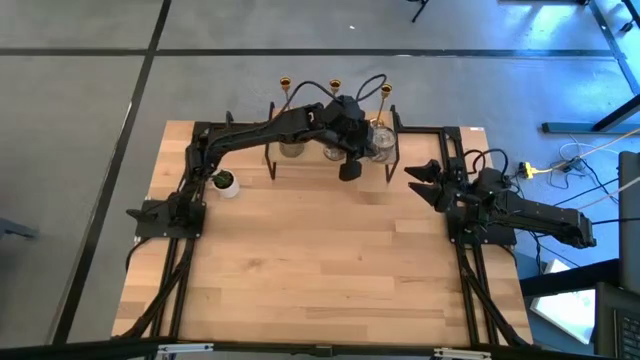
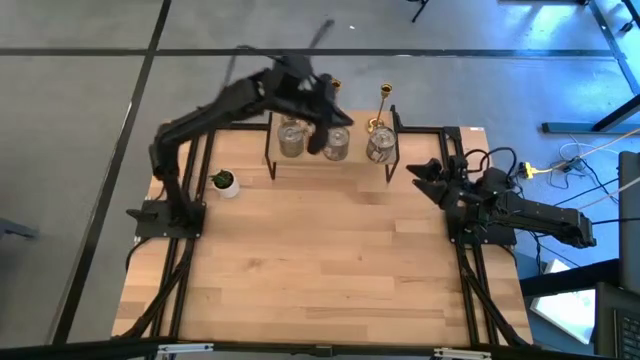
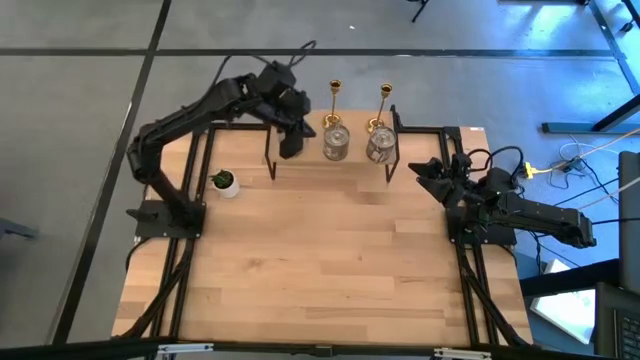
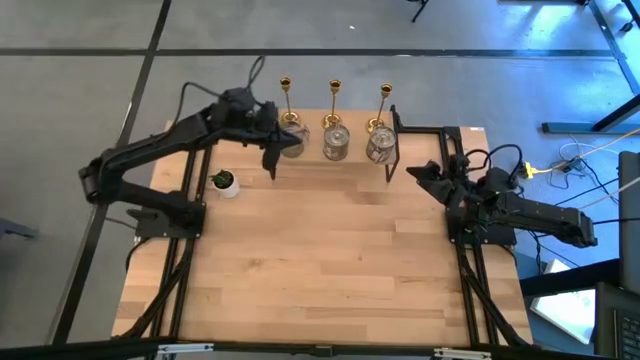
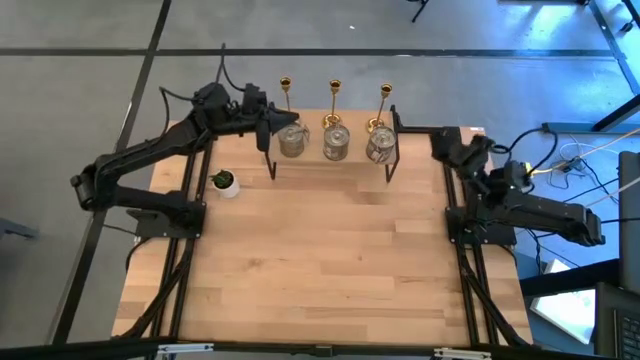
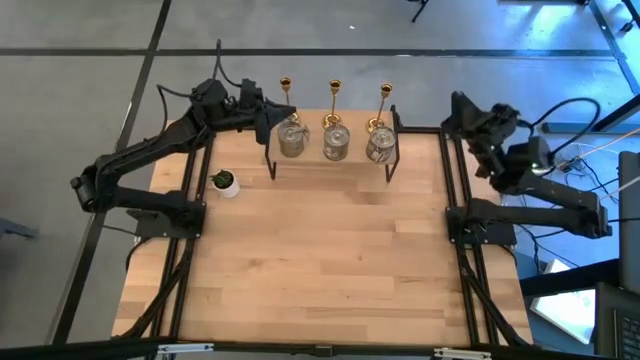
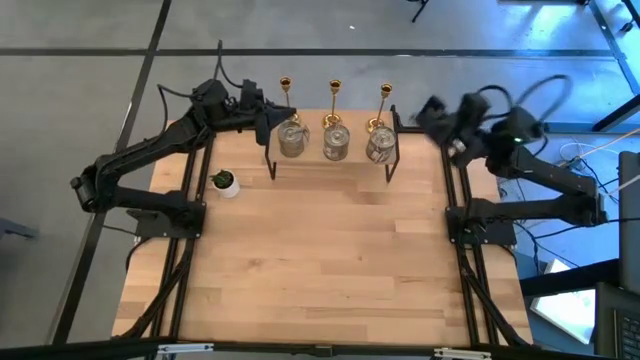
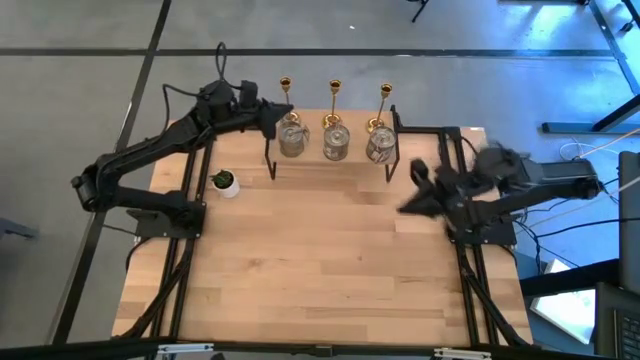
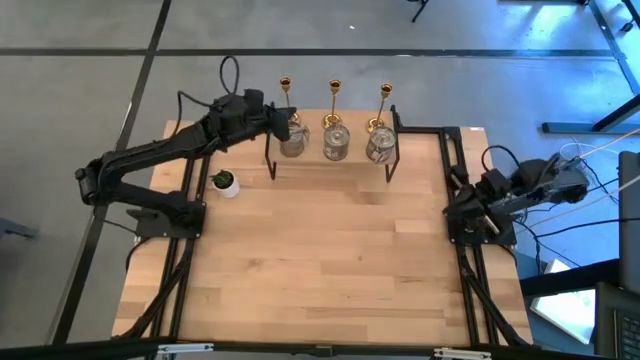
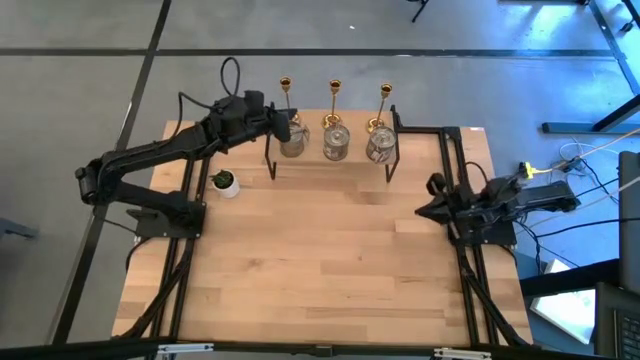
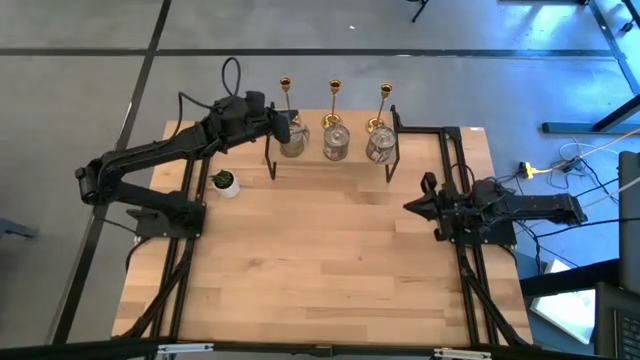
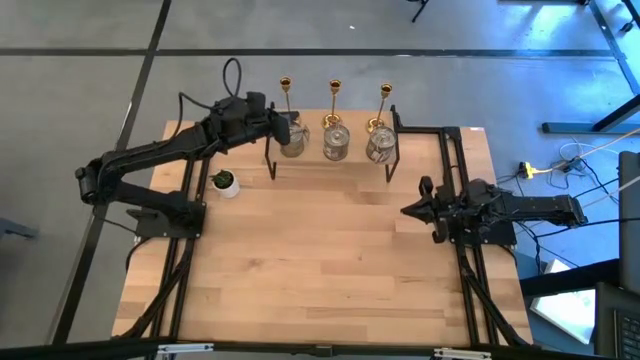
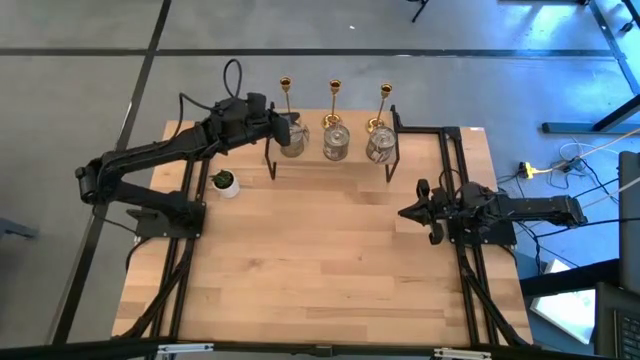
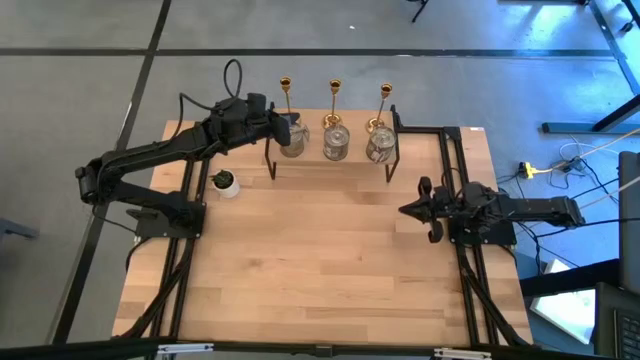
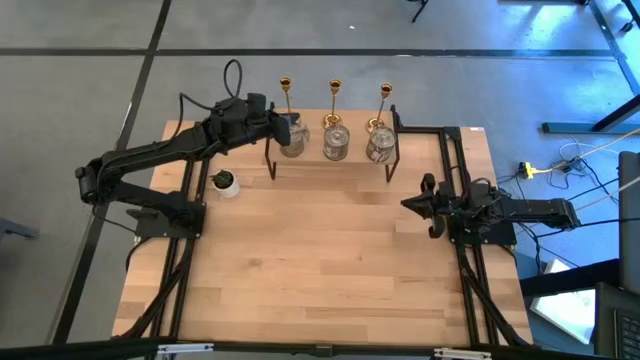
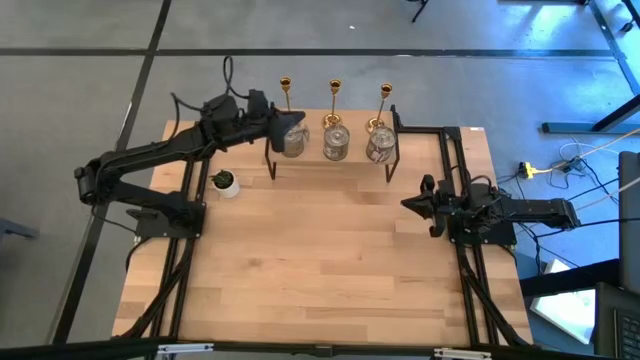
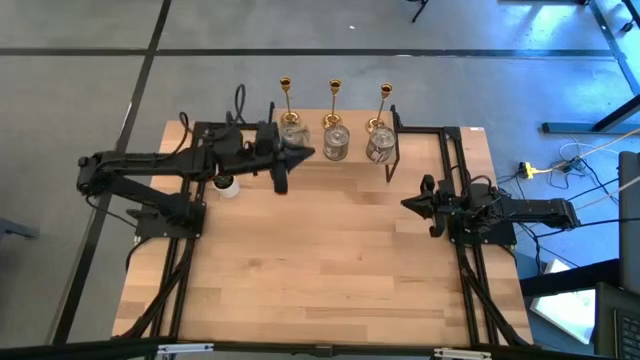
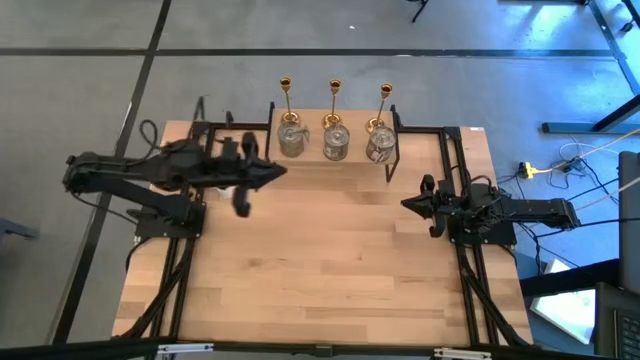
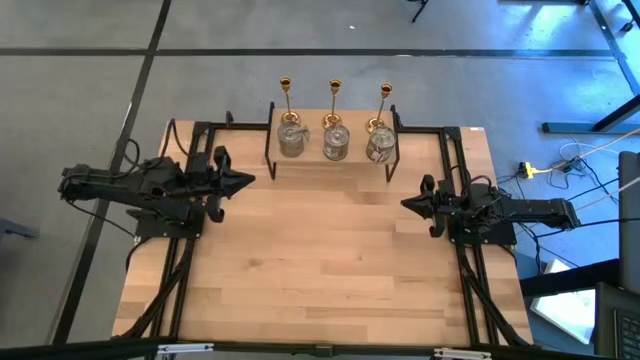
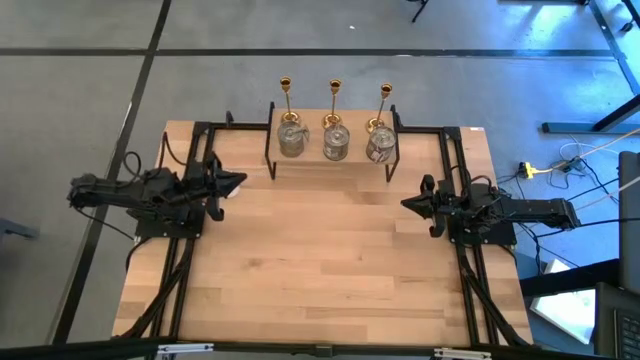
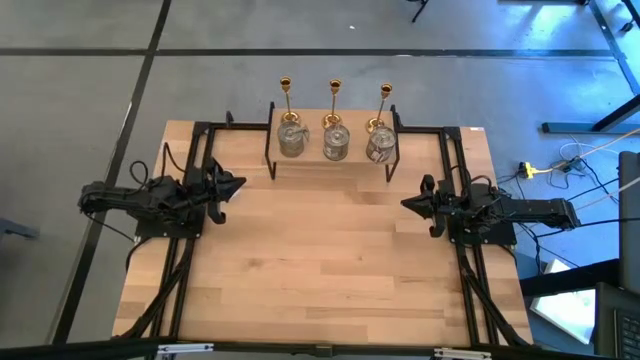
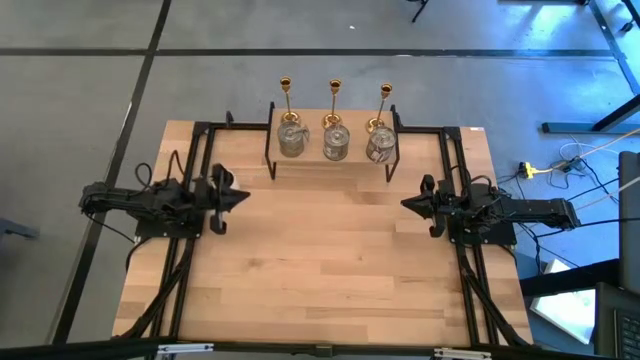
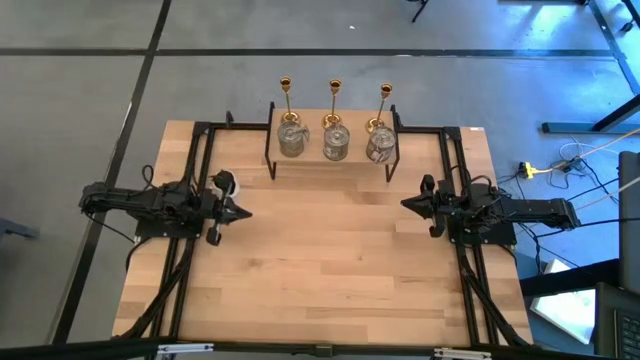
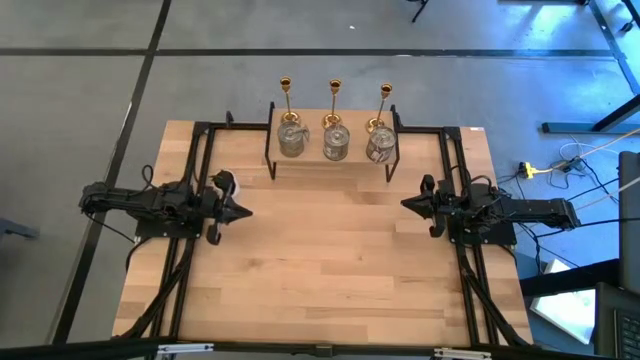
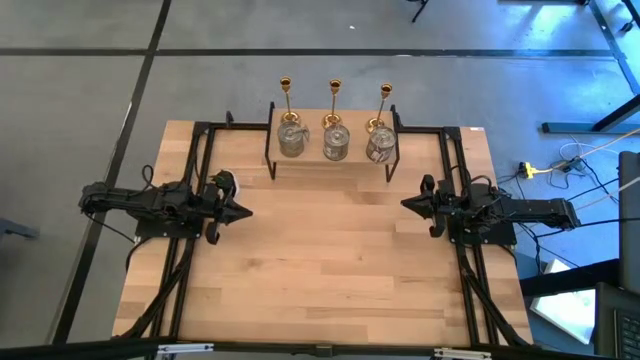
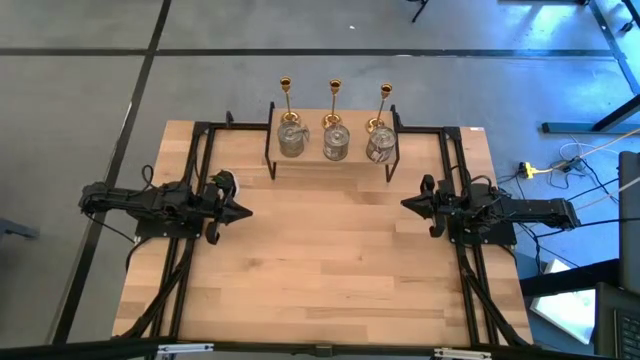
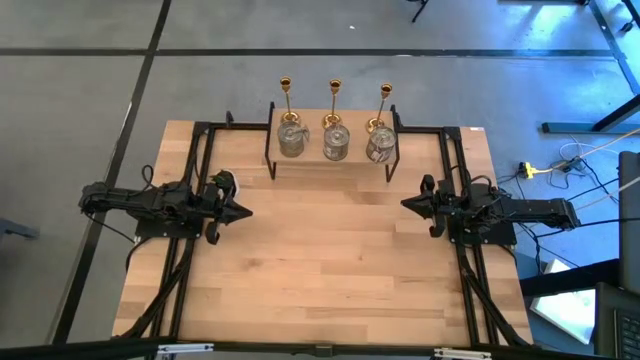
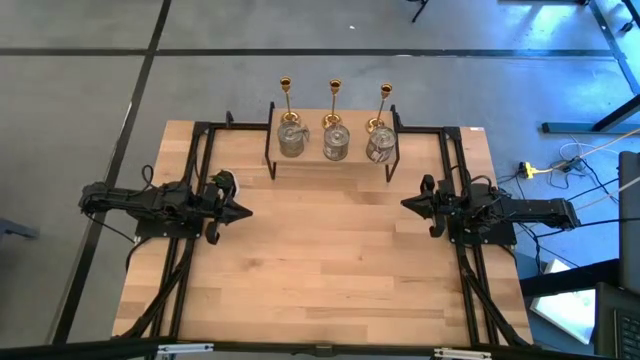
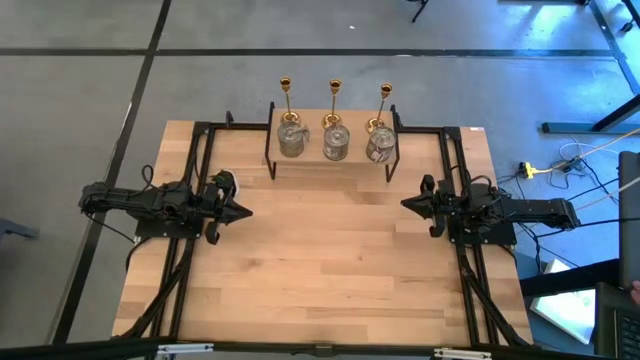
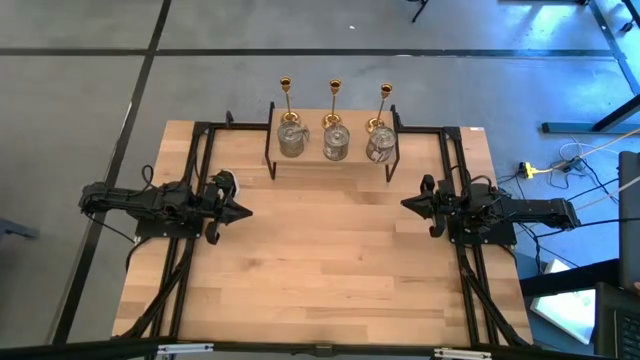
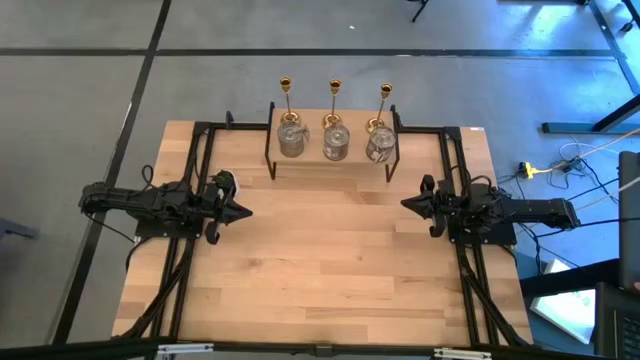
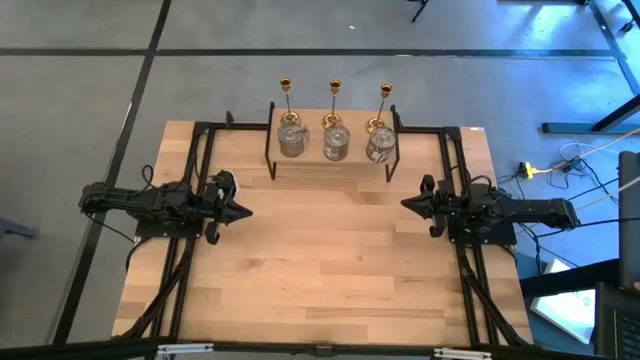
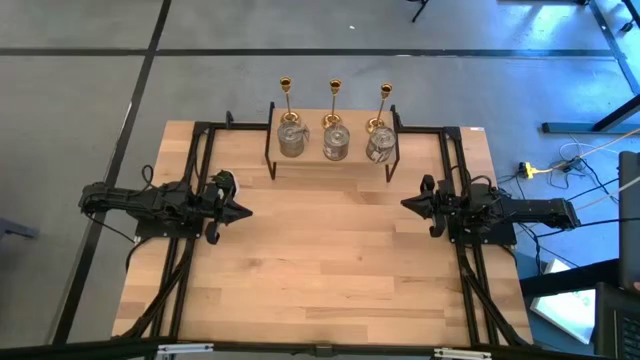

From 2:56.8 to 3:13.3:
Task: Pick & Place candle stick holders
Return to Home Position

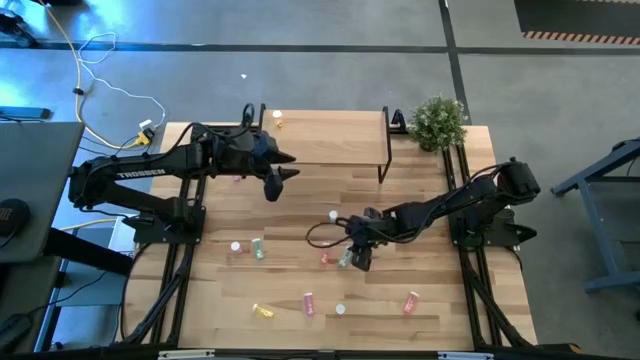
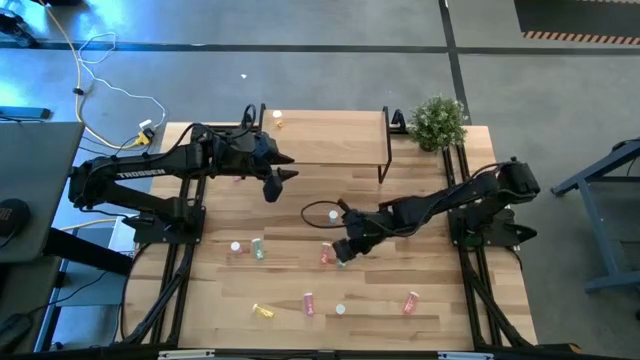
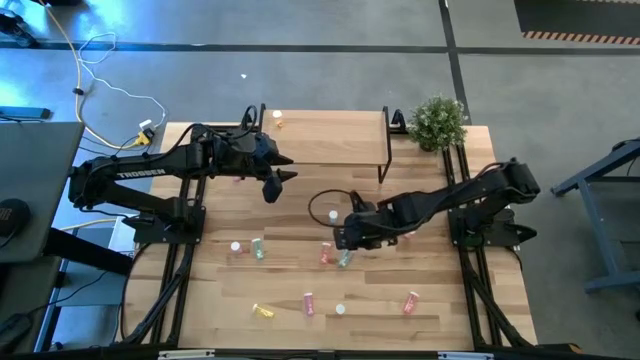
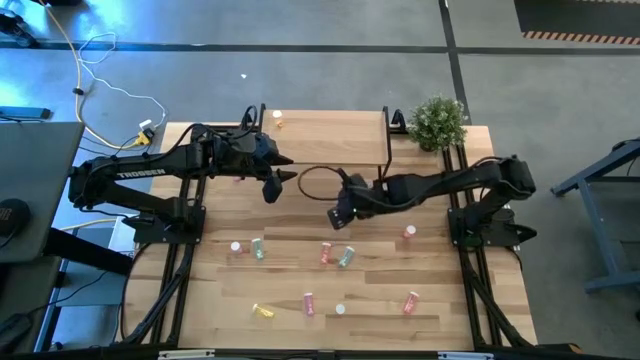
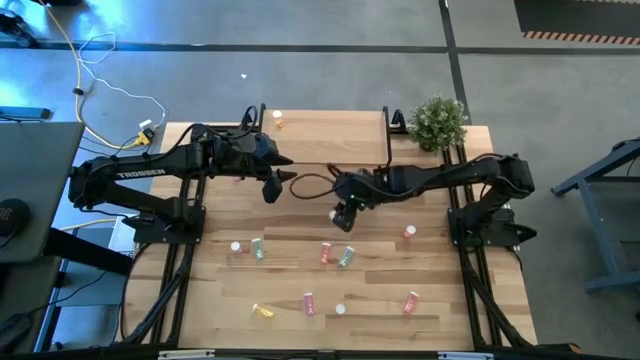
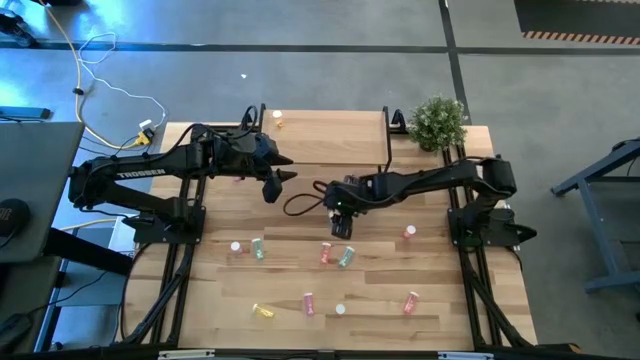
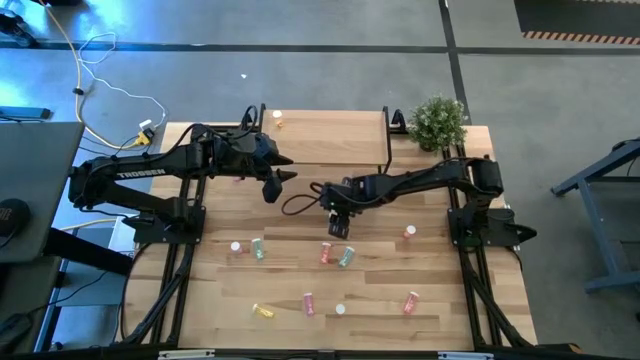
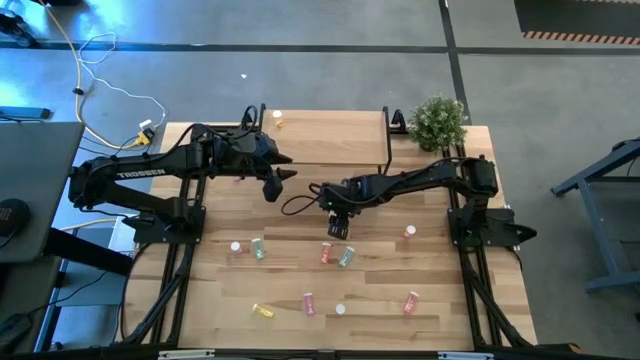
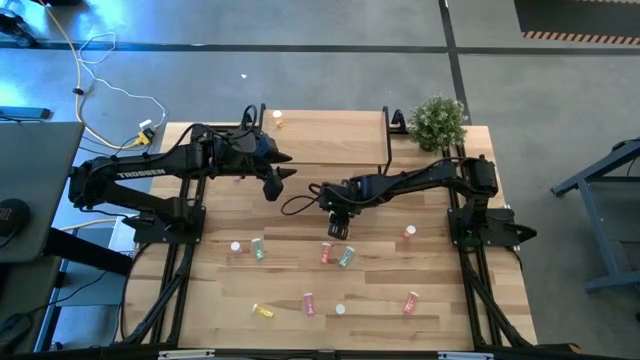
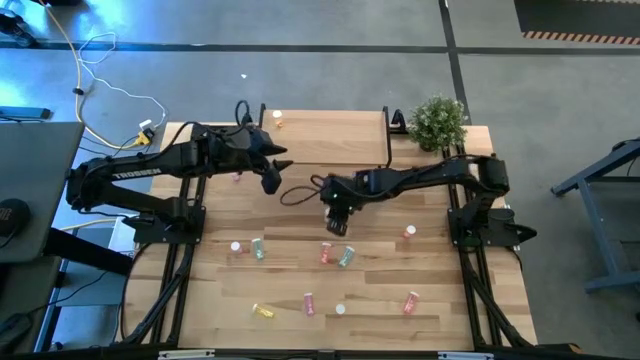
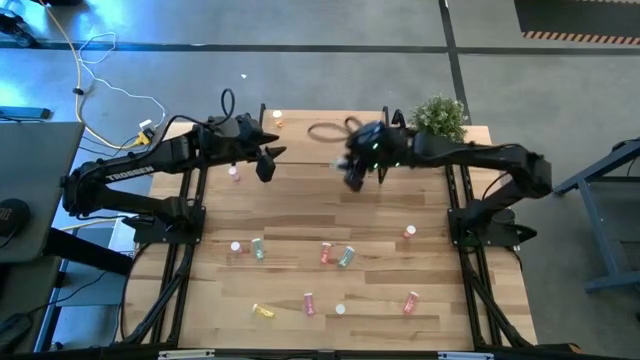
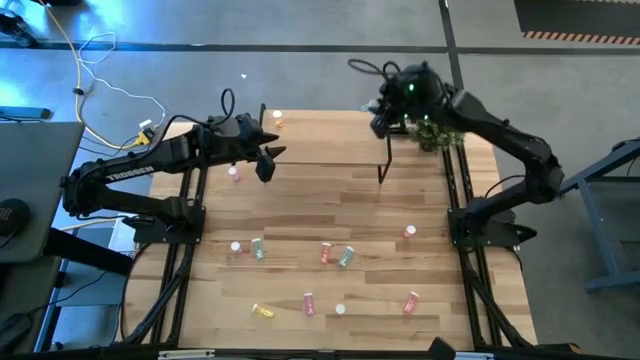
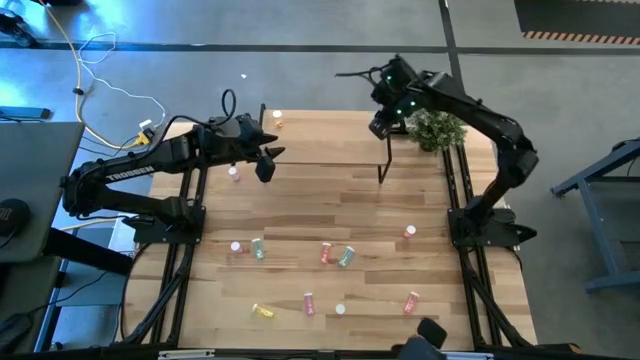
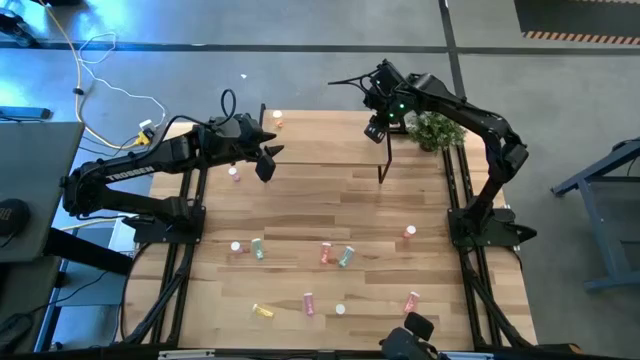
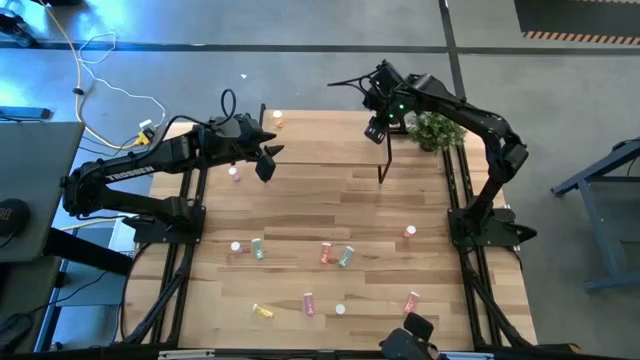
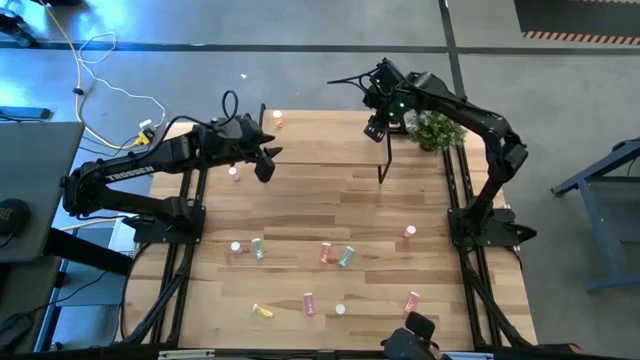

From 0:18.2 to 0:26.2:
Task: Pick and place medicine bottles onto shelf by color
Put the top blue pill bottle on the shelf
